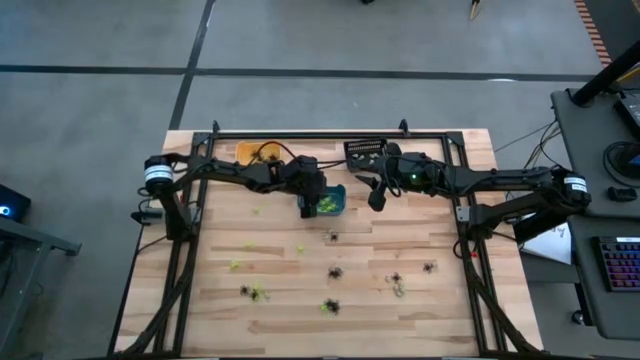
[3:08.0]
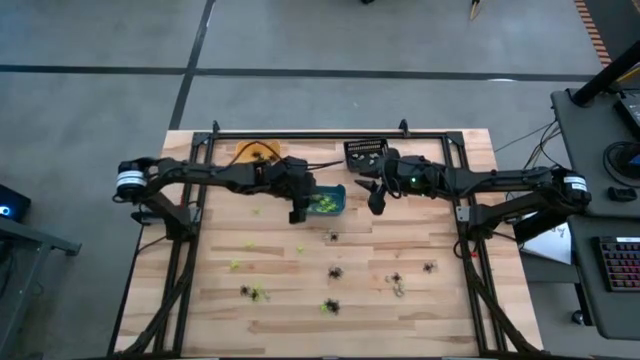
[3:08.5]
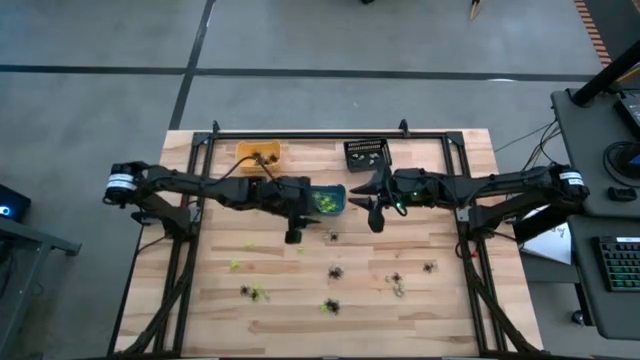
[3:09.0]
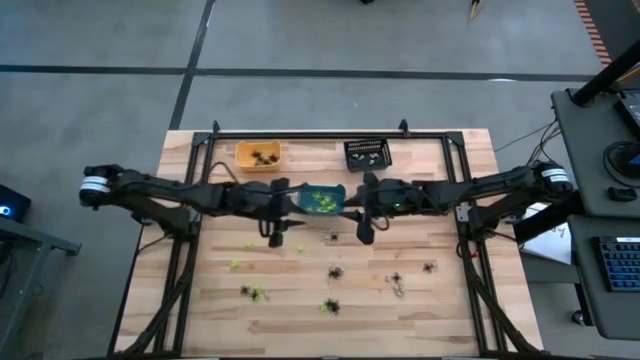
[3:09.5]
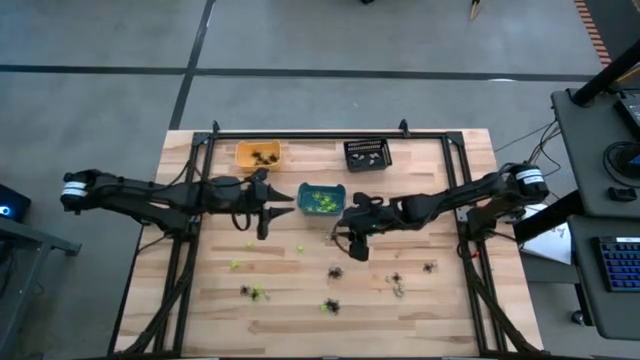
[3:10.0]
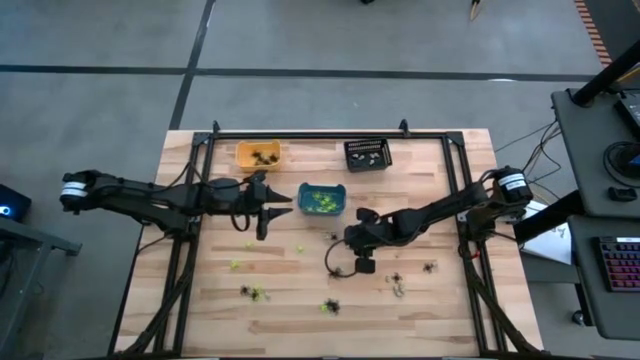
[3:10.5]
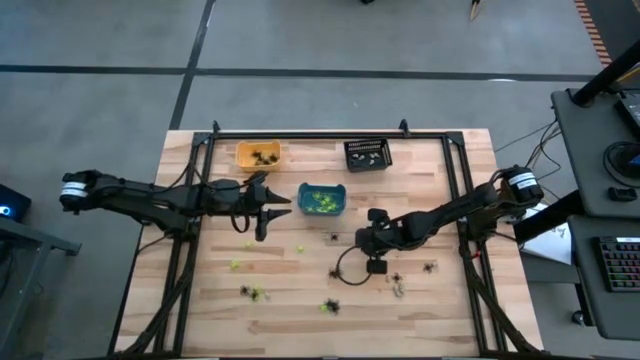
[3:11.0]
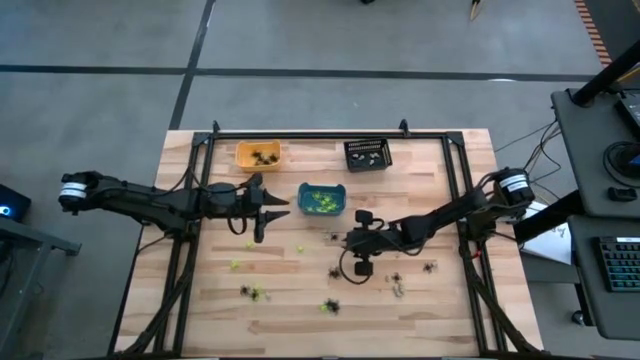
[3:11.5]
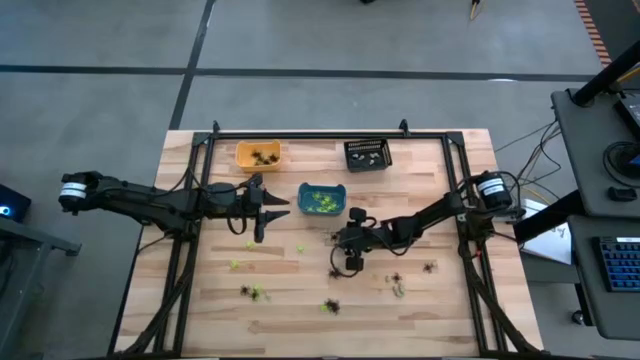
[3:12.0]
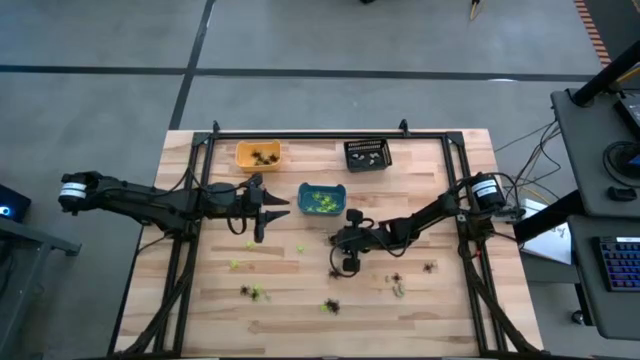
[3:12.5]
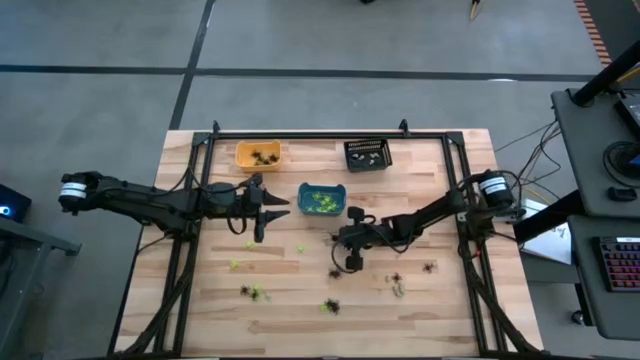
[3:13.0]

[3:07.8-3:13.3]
Task: Sort Halloween decoration
Put the black spider toy into the yellow bin

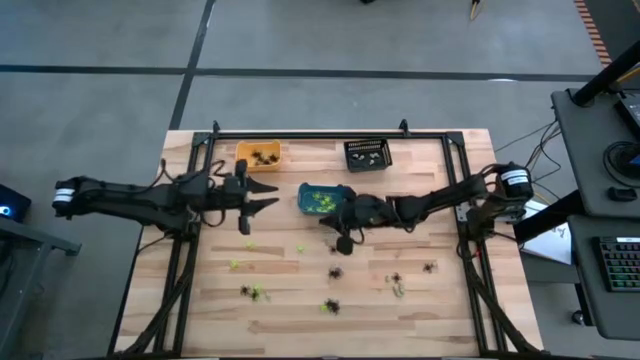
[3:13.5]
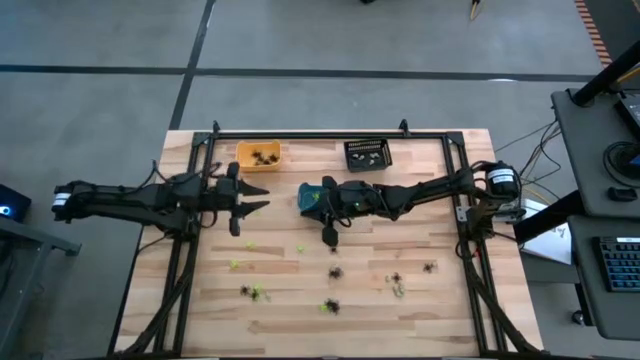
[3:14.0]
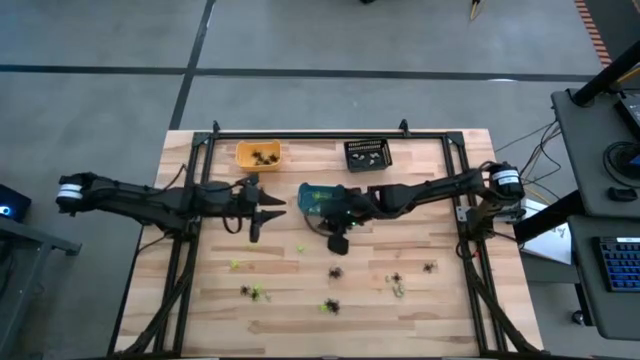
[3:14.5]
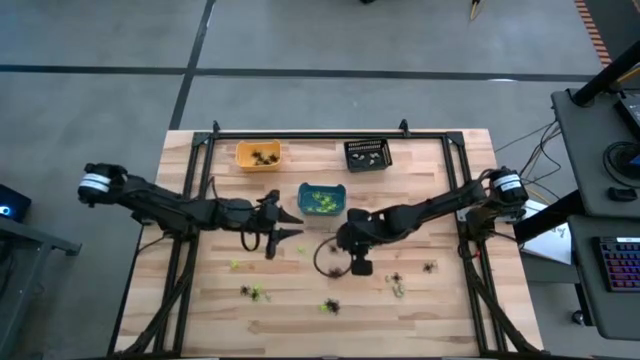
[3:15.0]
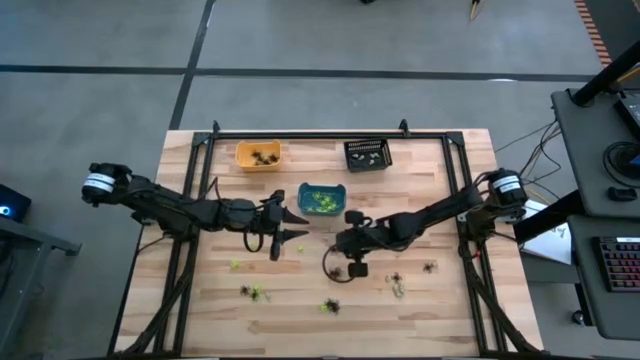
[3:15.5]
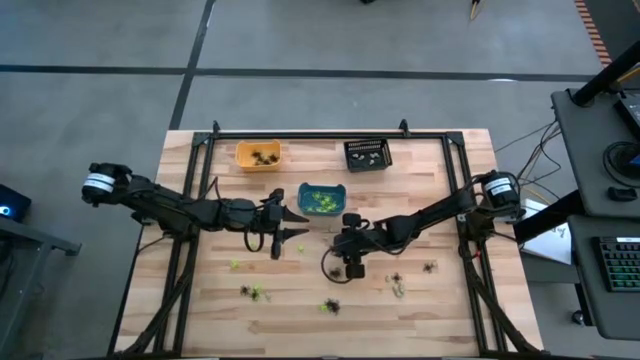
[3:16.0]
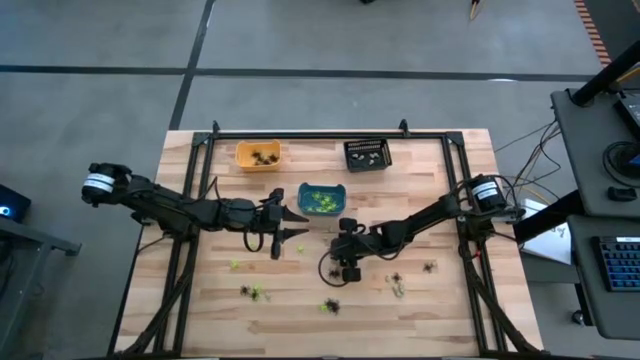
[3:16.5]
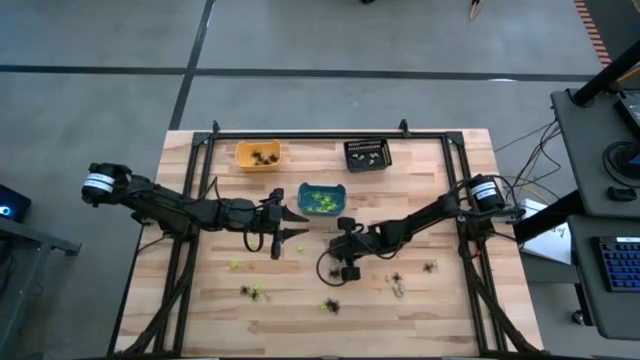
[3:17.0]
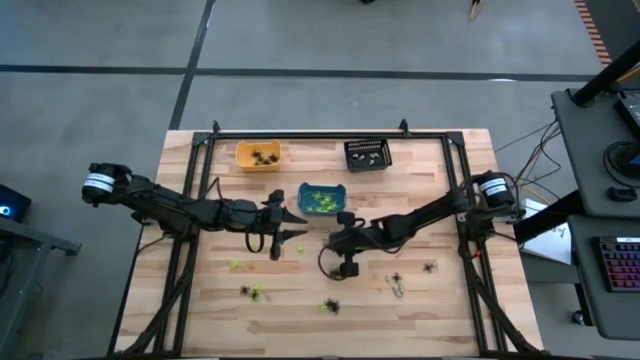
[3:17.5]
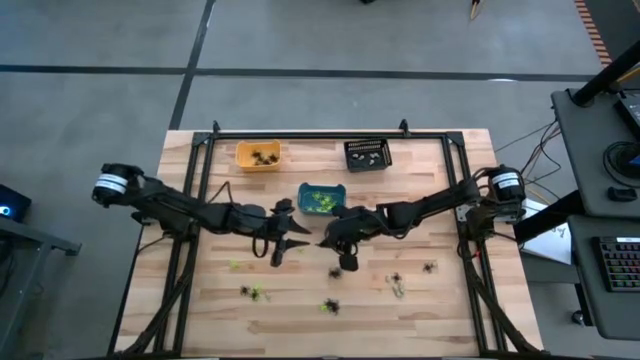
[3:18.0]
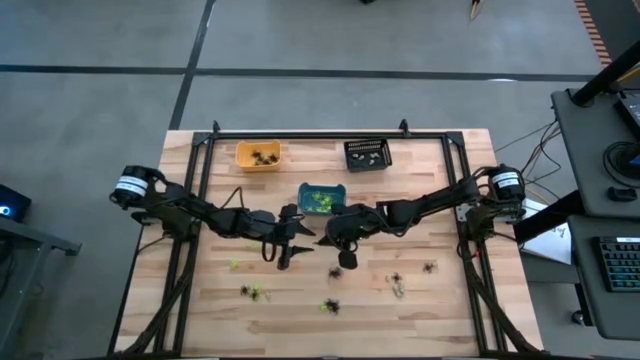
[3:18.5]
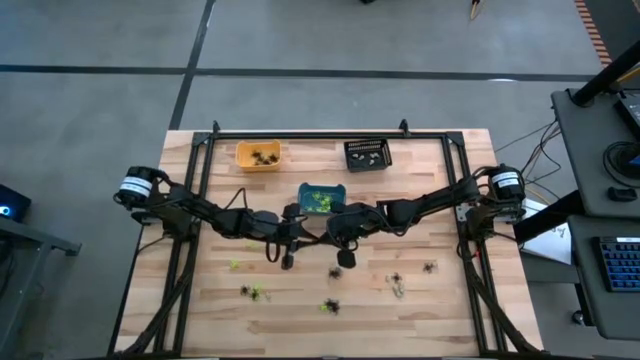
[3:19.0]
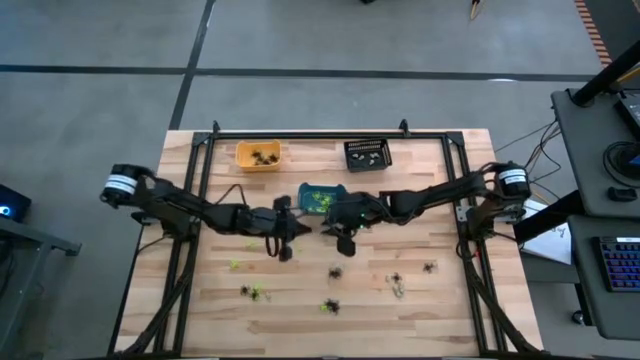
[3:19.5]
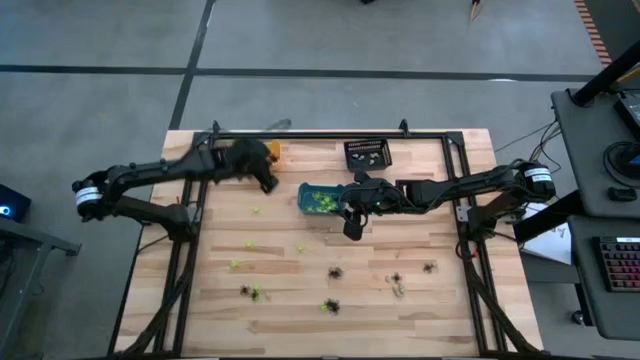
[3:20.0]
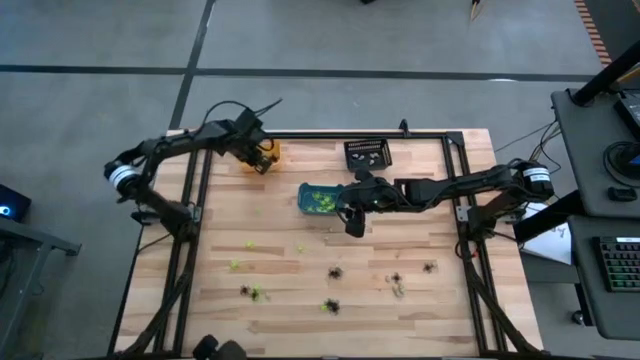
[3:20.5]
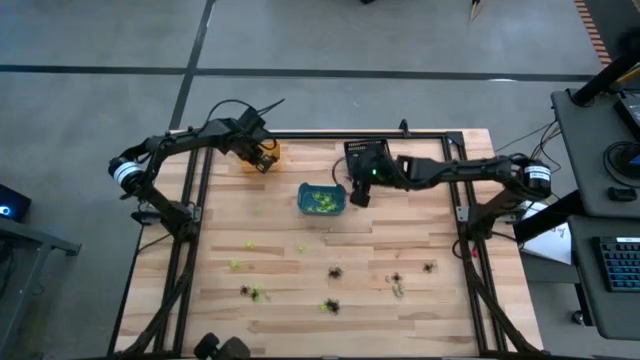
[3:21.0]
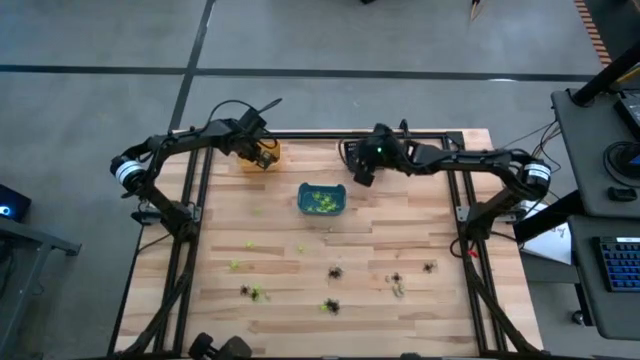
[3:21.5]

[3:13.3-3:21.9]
Put the black spider toy into the yellow bin

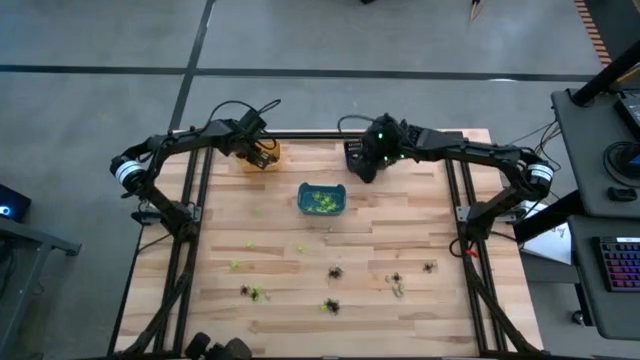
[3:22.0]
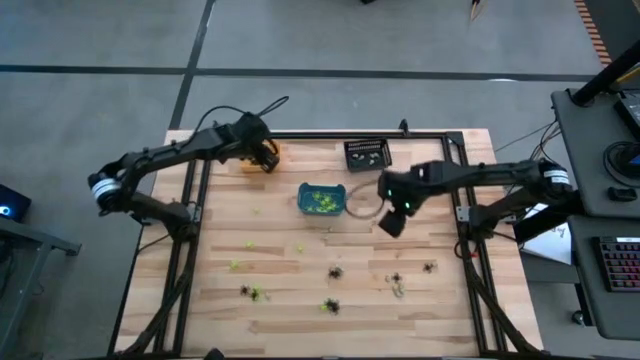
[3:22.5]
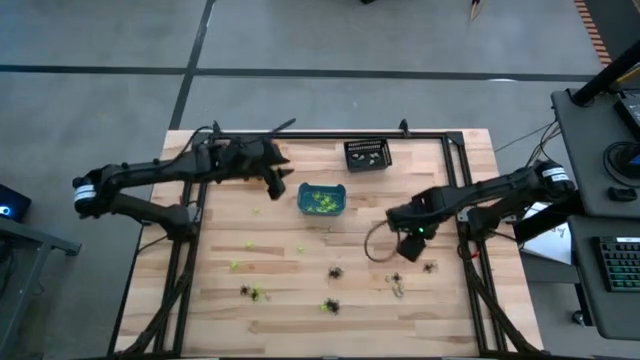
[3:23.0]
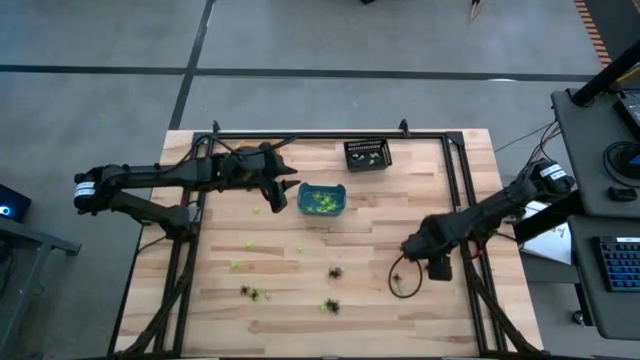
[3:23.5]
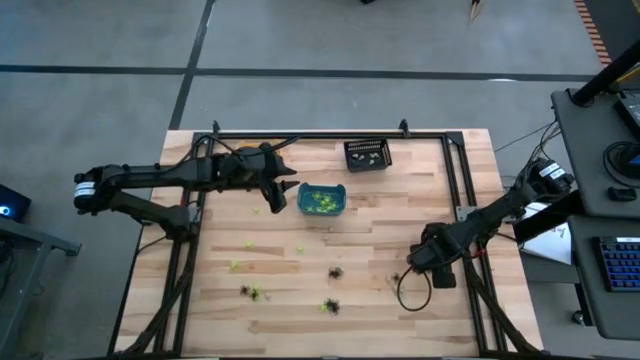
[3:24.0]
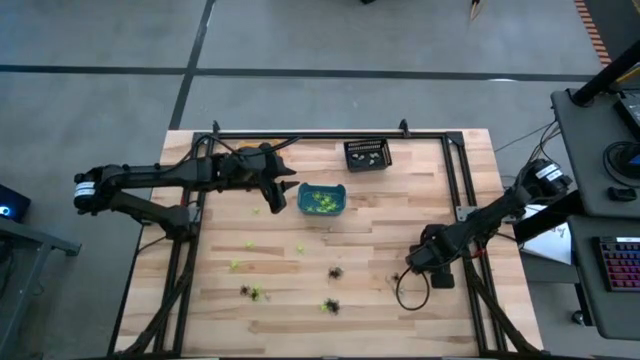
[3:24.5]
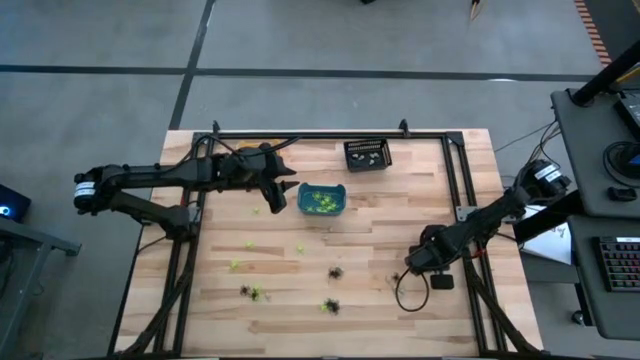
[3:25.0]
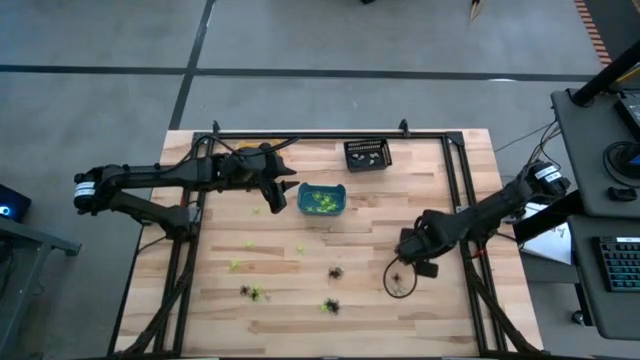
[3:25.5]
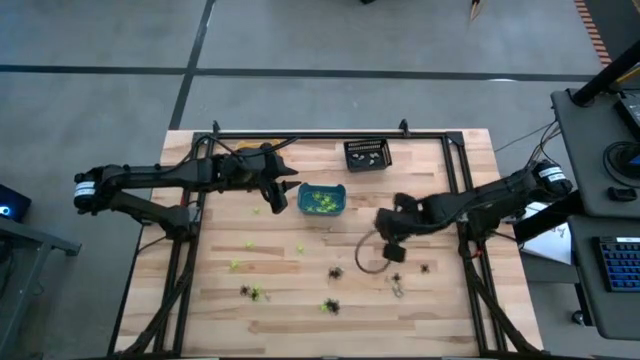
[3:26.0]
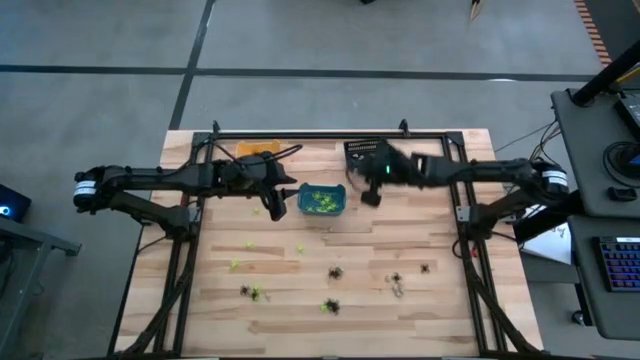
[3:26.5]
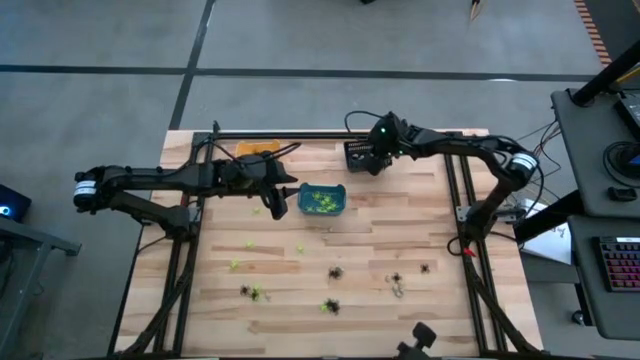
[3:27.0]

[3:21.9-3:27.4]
Put the white skull toy into the black bin

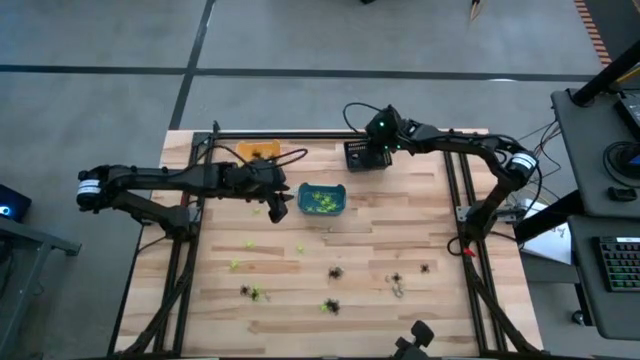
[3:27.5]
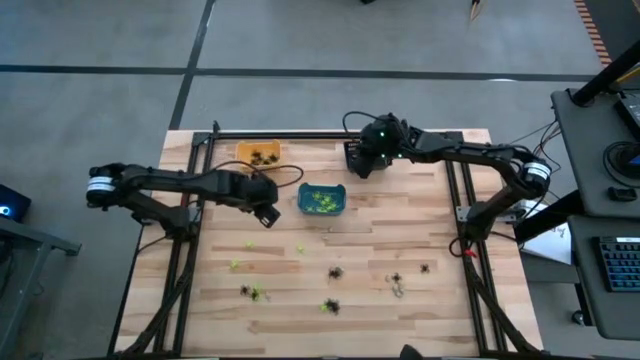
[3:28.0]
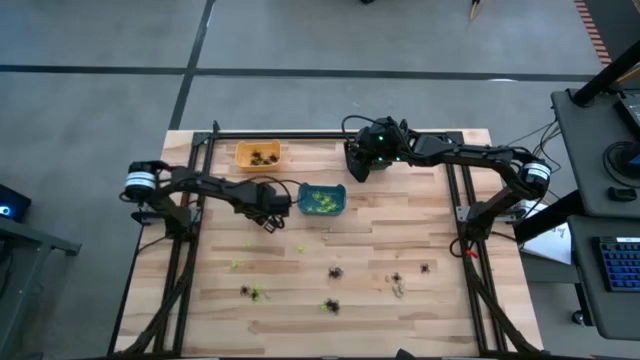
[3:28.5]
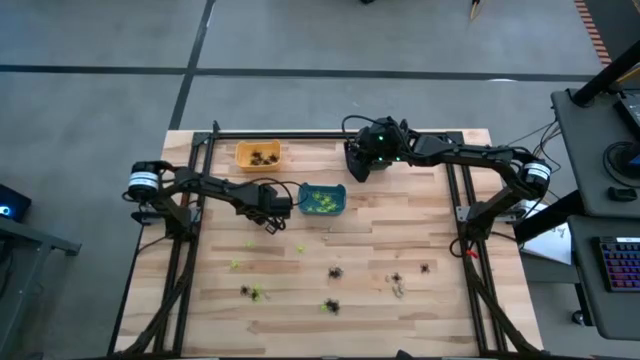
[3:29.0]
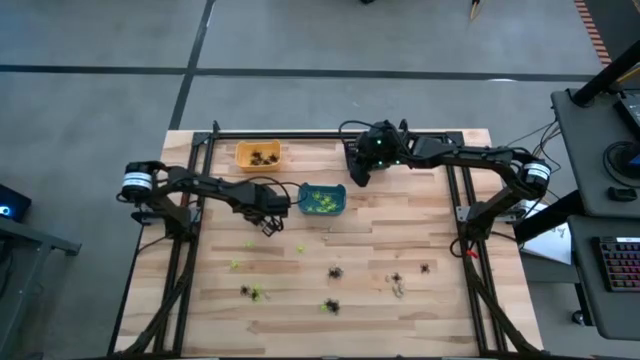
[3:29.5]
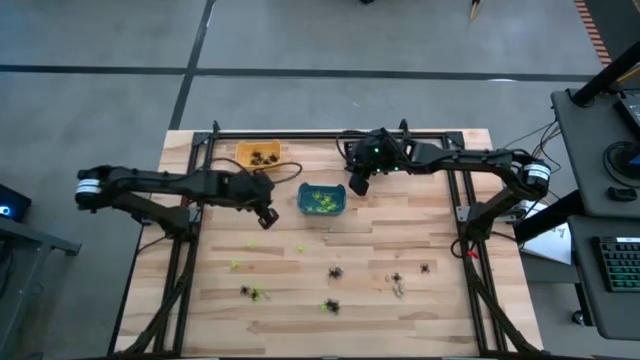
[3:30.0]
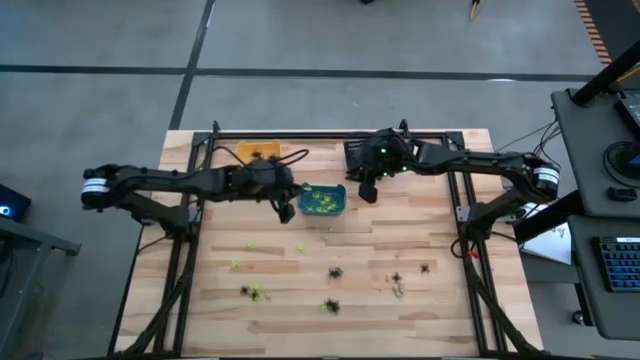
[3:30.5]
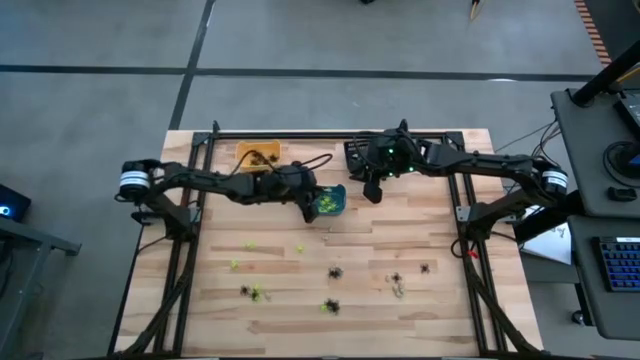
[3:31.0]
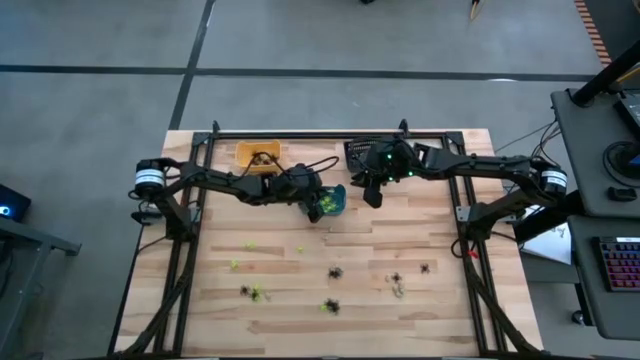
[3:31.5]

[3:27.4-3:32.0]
Put the green spider toy into the blue bin
